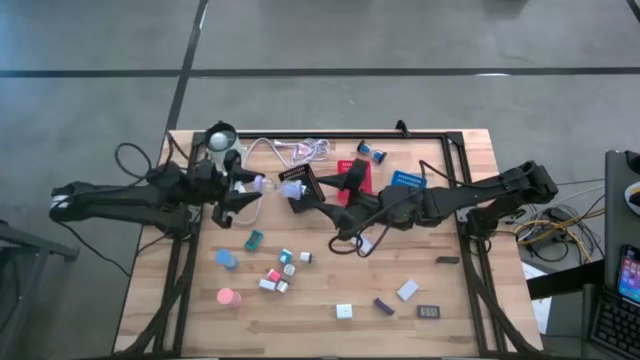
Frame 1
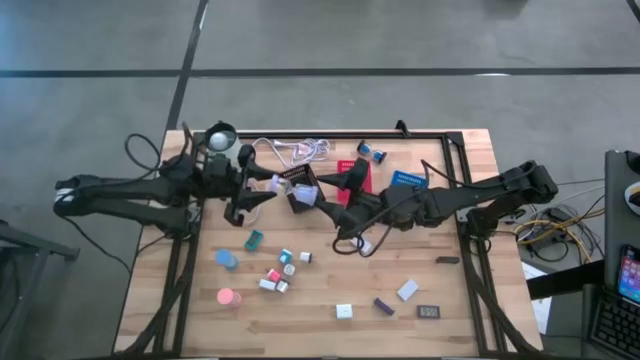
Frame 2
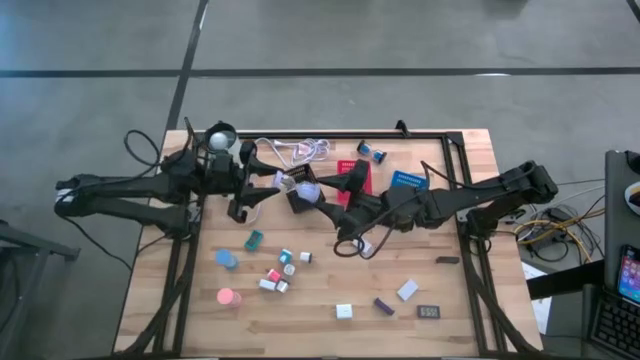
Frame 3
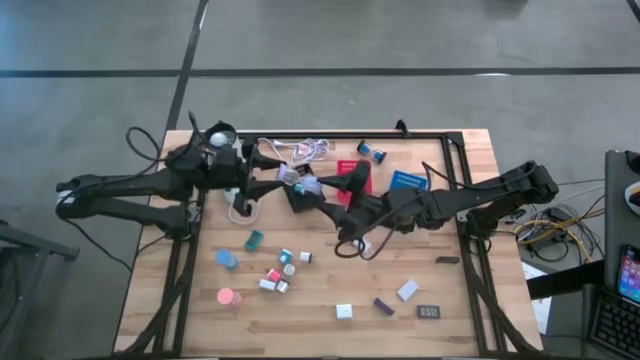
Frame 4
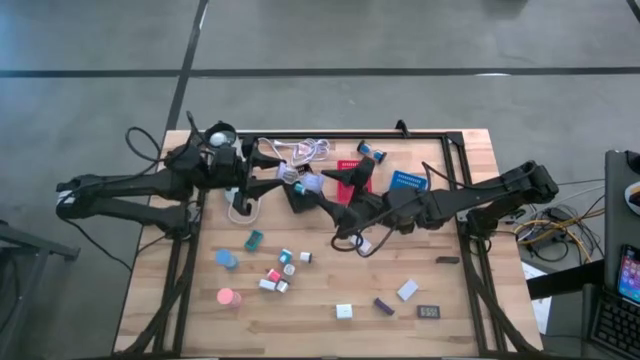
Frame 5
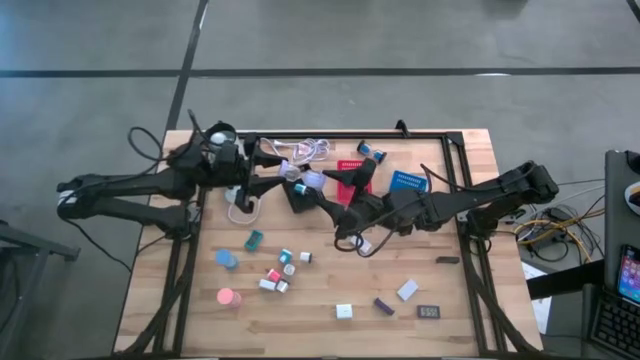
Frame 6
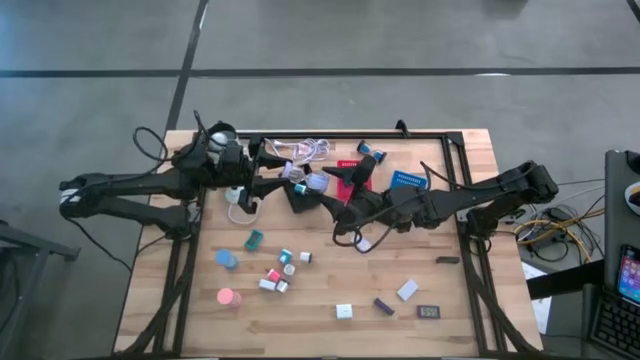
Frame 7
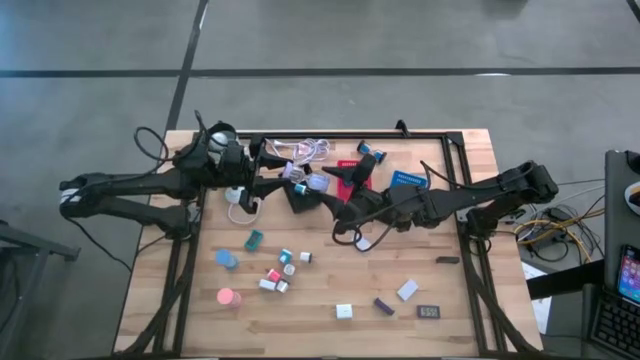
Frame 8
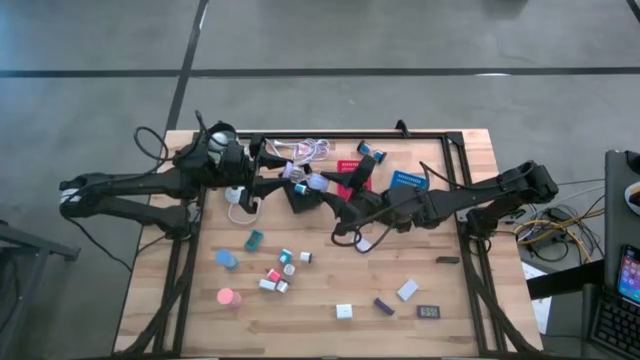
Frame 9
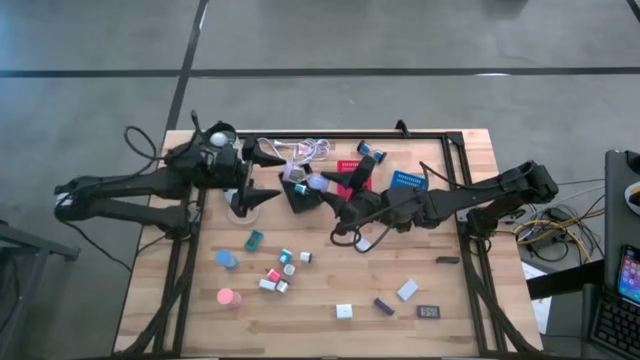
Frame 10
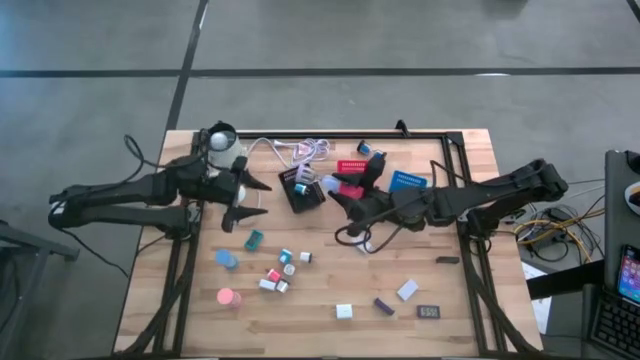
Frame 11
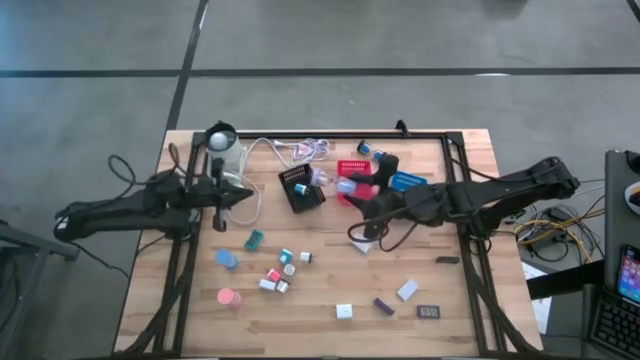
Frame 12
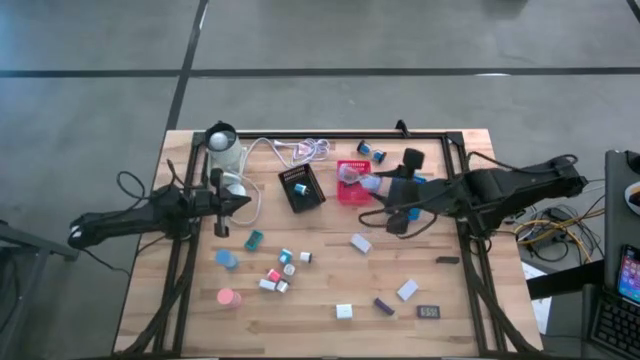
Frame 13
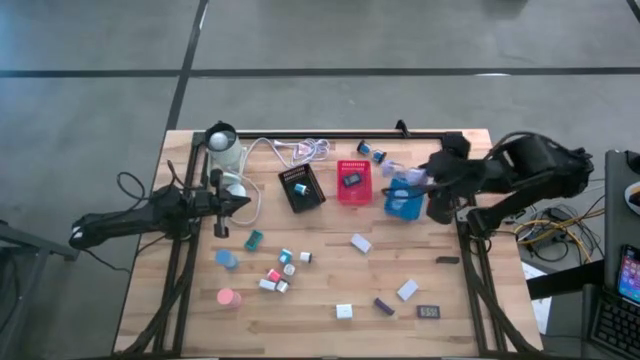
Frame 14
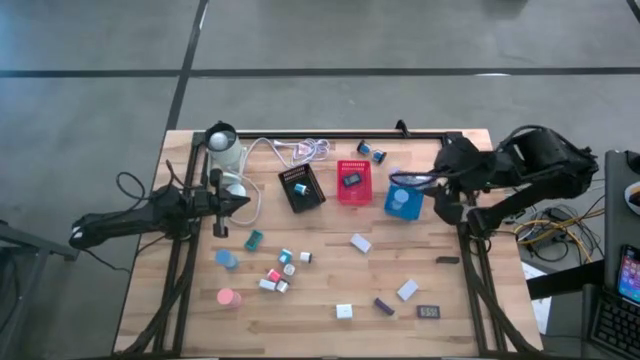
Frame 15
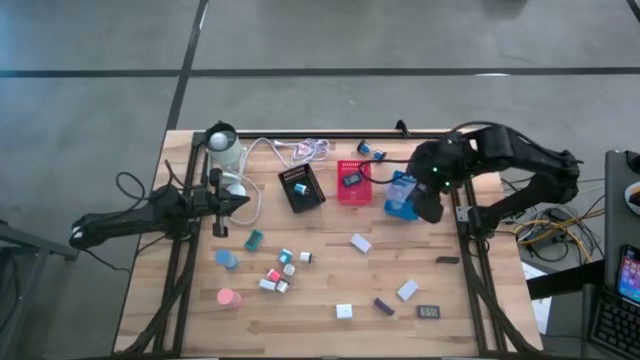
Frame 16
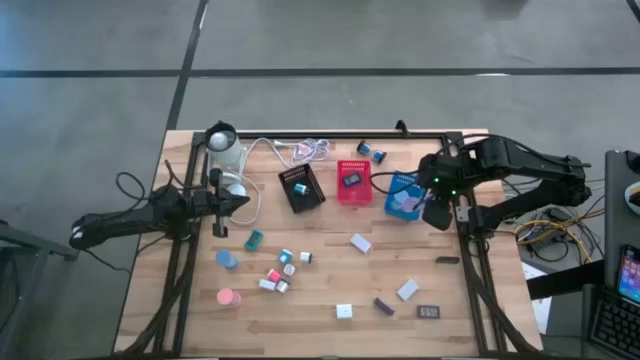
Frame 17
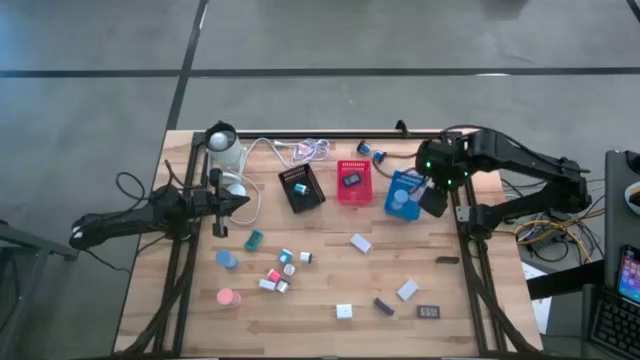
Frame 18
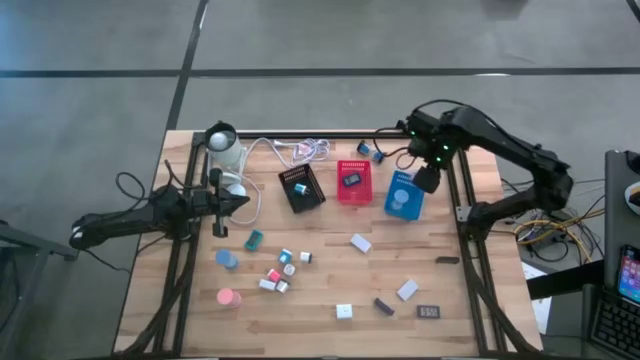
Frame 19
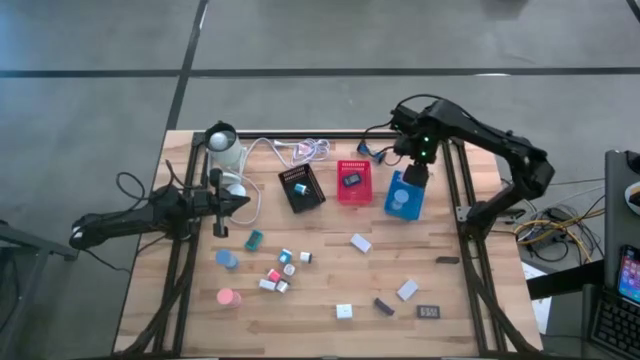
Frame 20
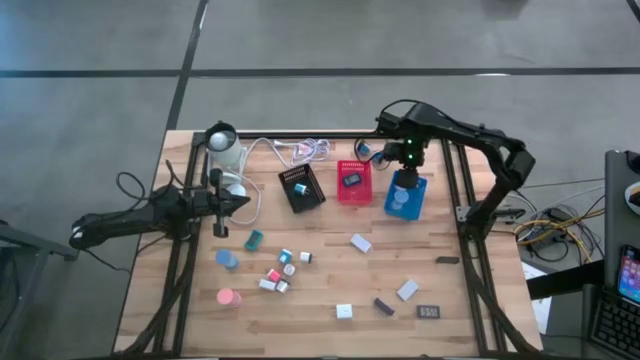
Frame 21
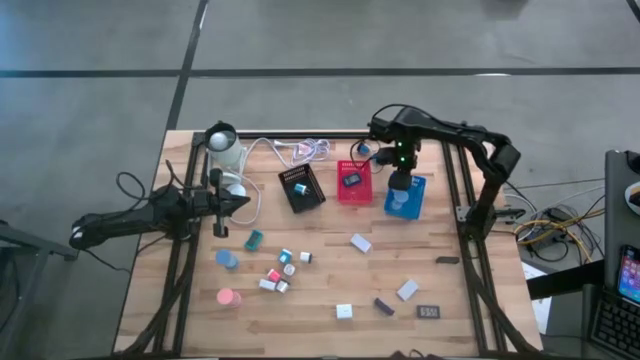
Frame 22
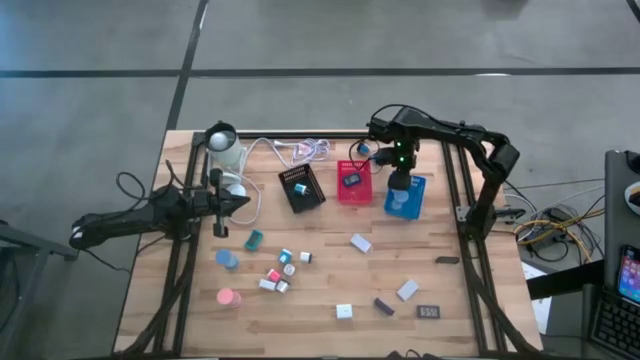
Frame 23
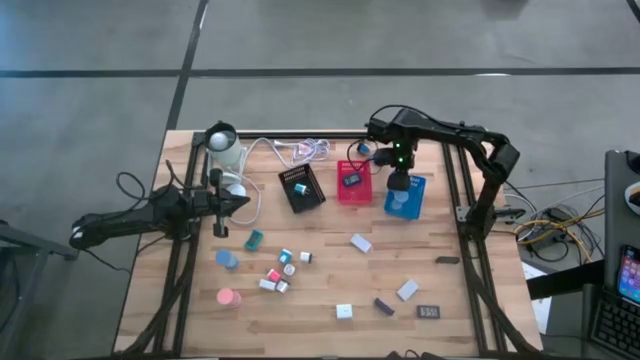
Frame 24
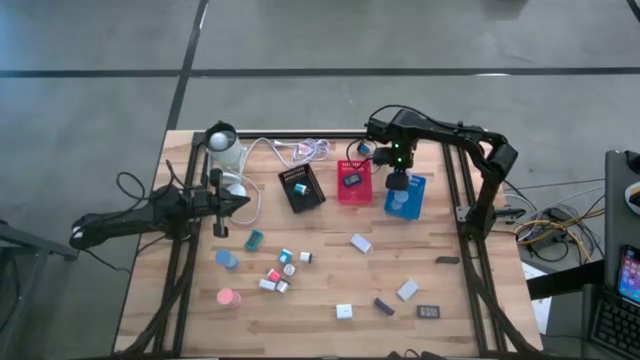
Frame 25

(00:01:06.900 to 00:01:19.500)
Task: Pick & Place Office items
Put the purple hourglass into the blue bin

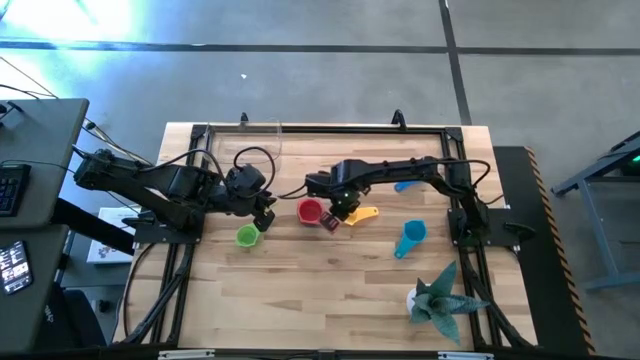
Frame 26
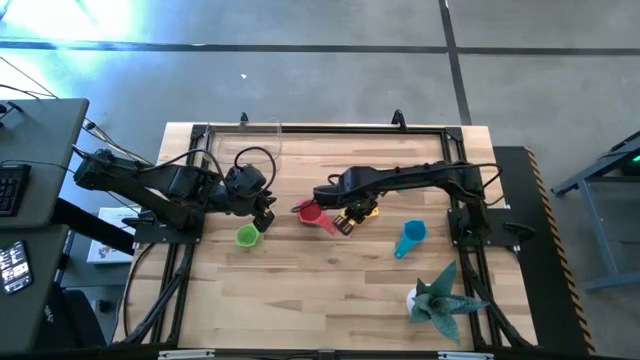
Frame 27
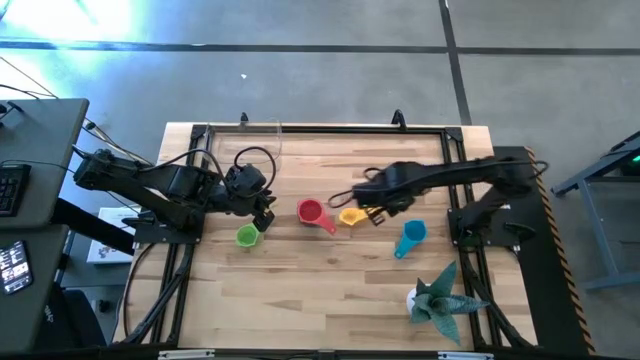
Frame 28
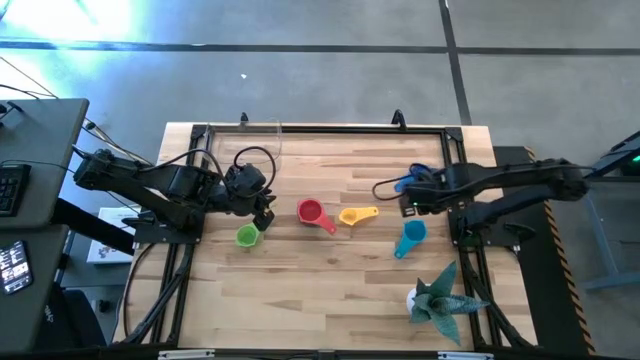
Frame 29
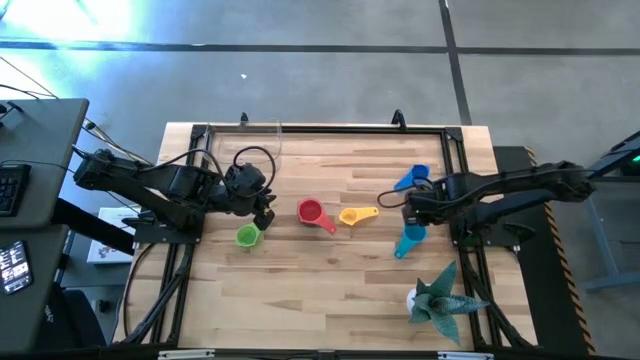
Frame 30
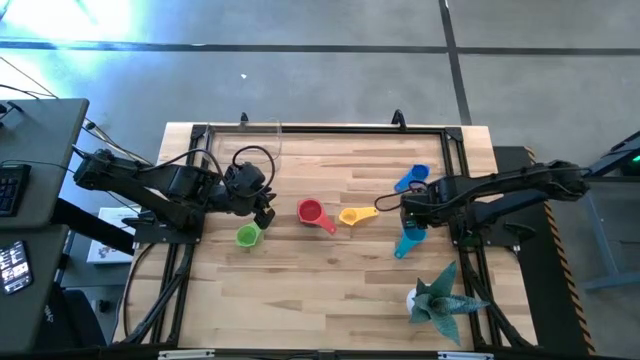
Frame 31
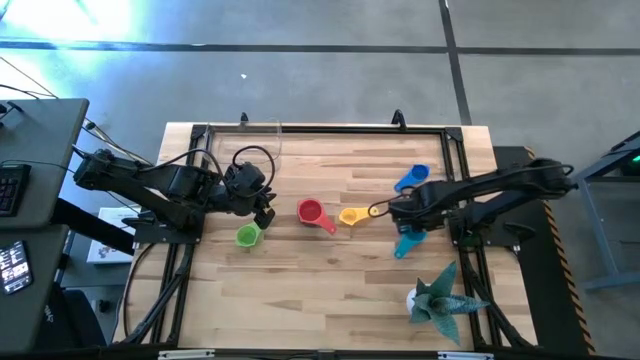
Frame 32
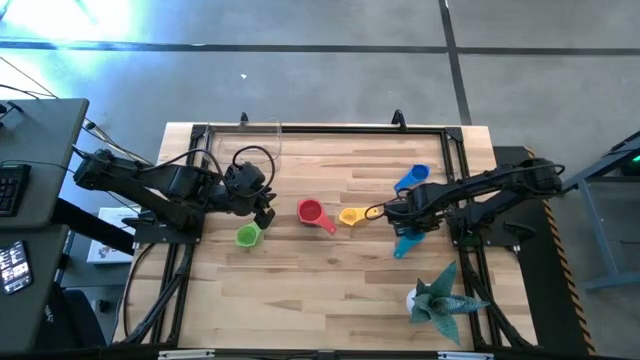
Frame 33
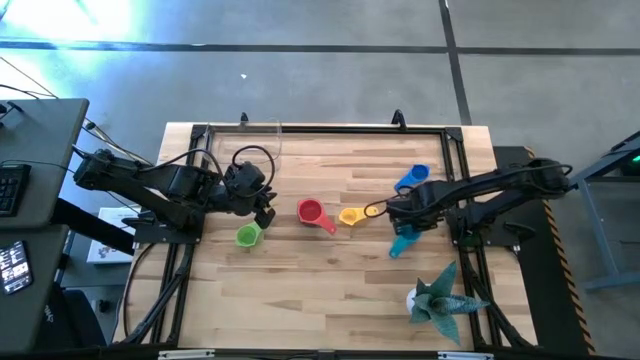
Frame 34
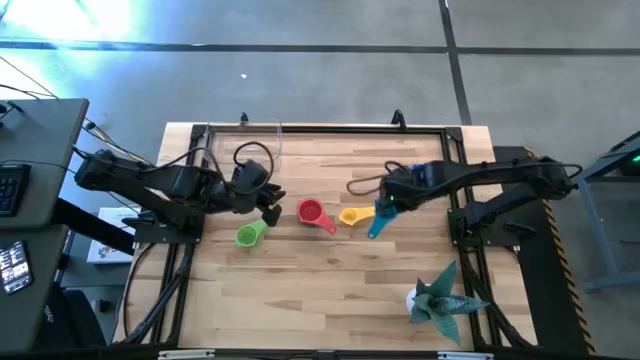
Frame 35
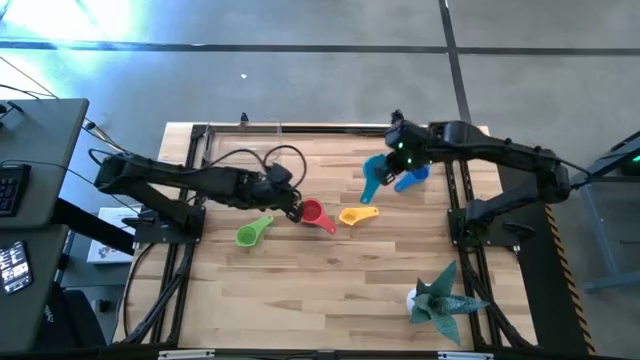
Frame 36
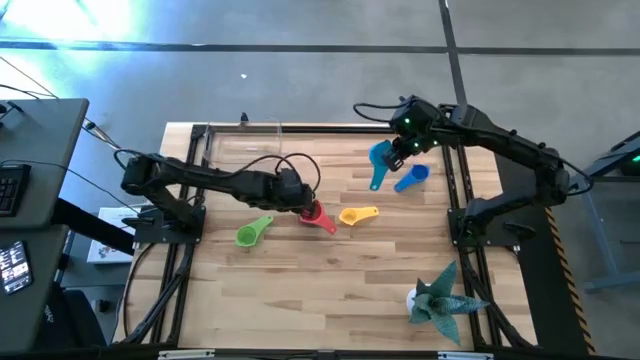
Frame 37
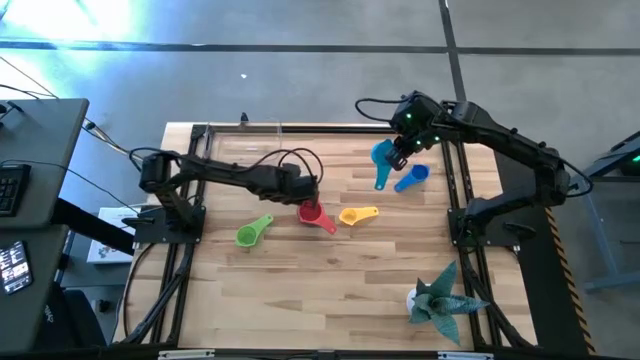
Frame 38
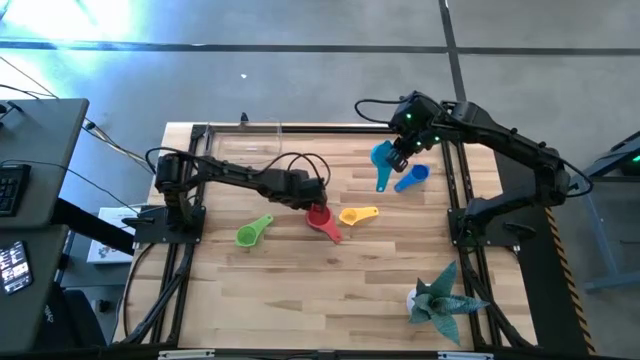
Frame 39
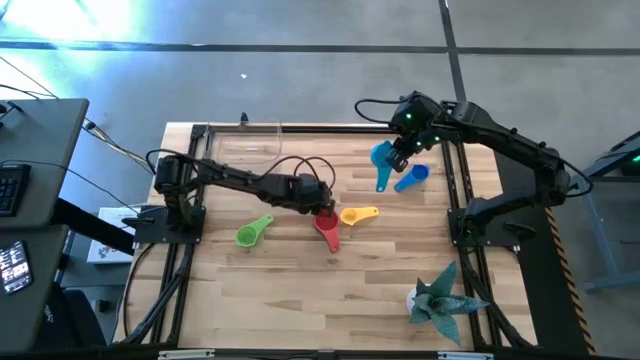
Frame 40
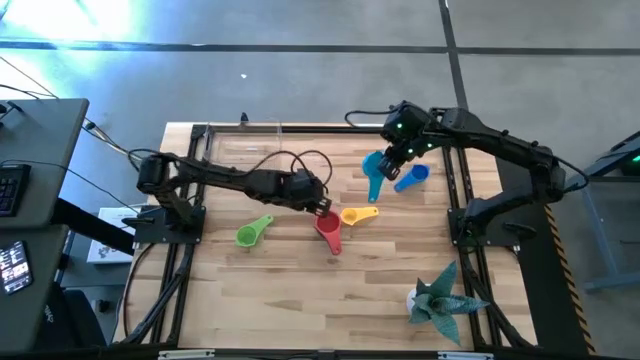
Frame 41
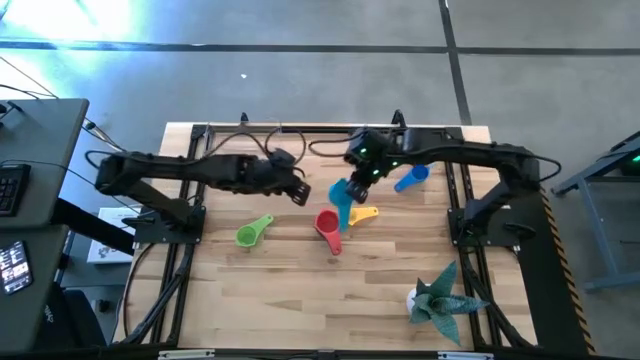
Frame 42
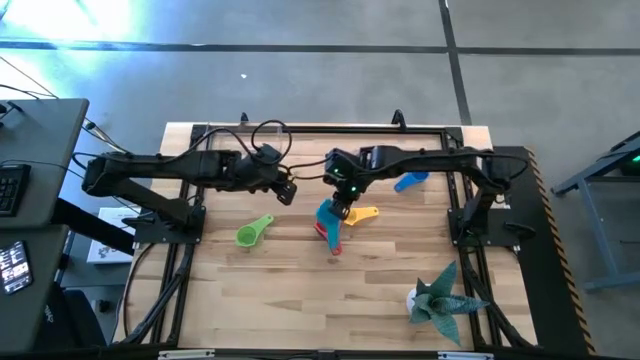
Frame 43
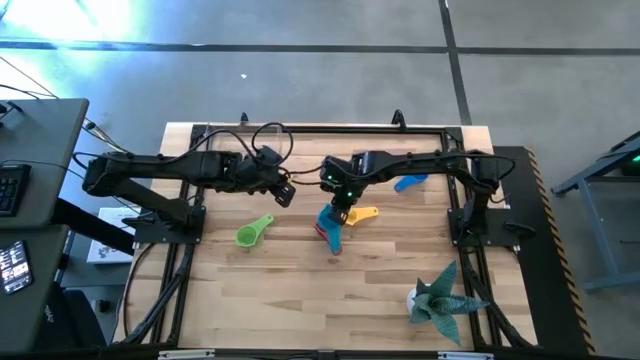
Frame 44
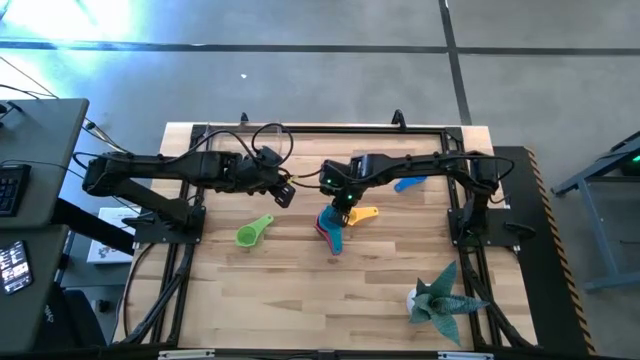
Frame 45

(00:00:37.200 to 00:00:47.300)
Task: Nest measuring cups in basket
Stack the light blue measuring cup on top of the red measuring cup
